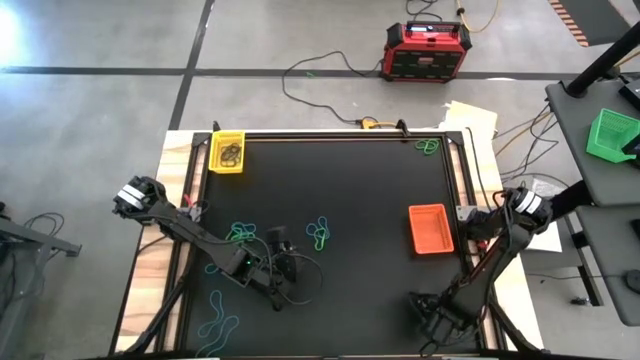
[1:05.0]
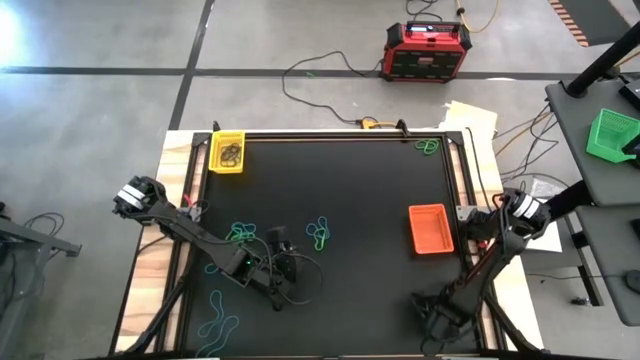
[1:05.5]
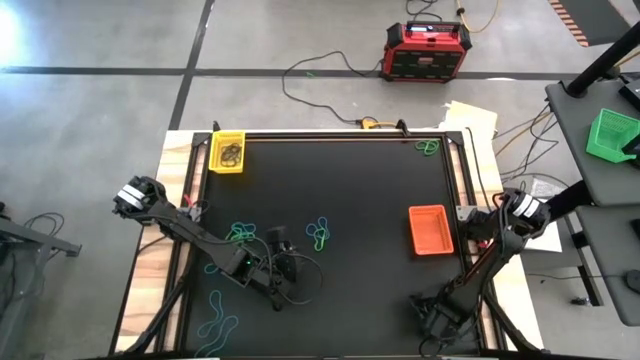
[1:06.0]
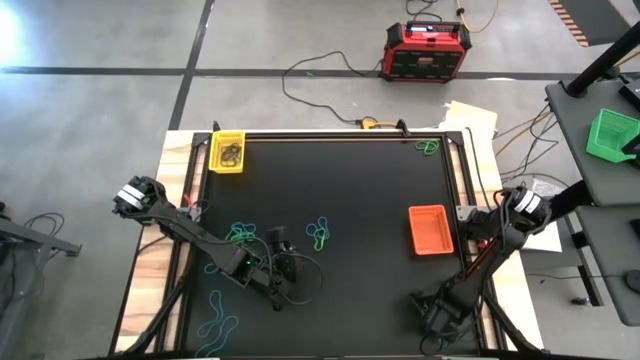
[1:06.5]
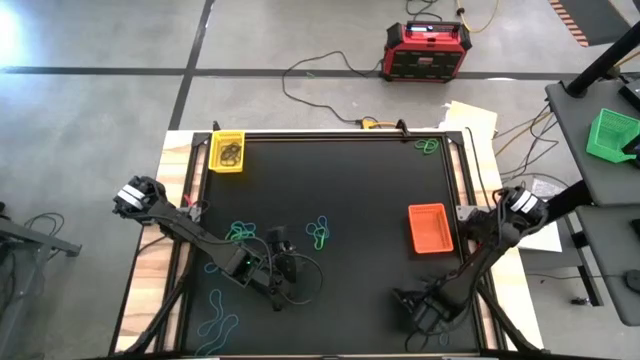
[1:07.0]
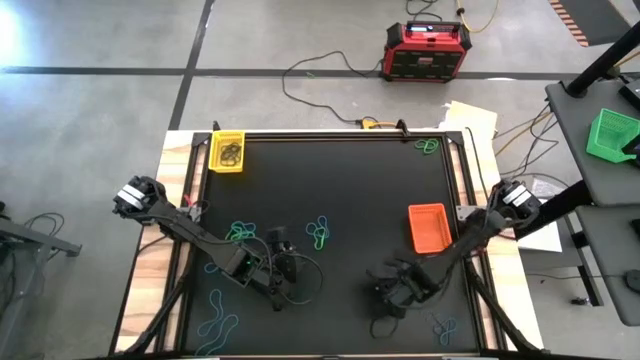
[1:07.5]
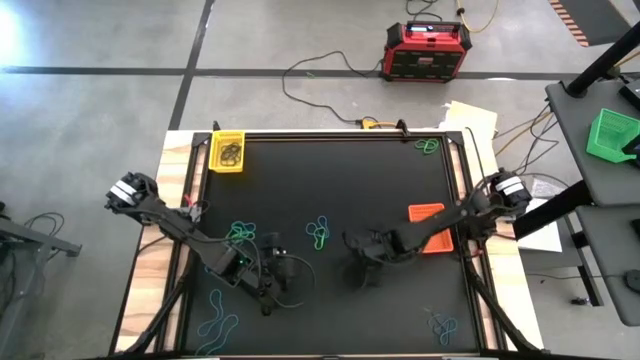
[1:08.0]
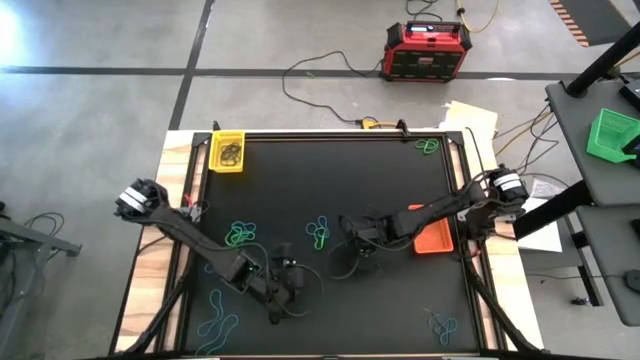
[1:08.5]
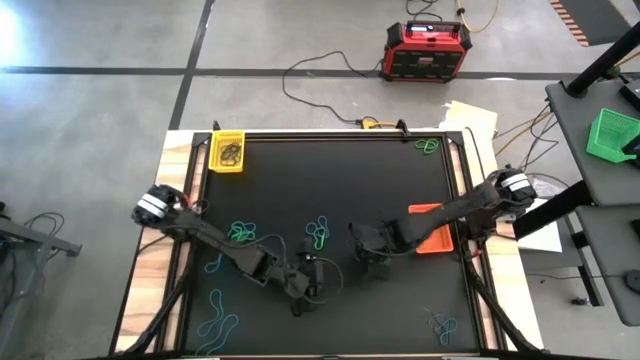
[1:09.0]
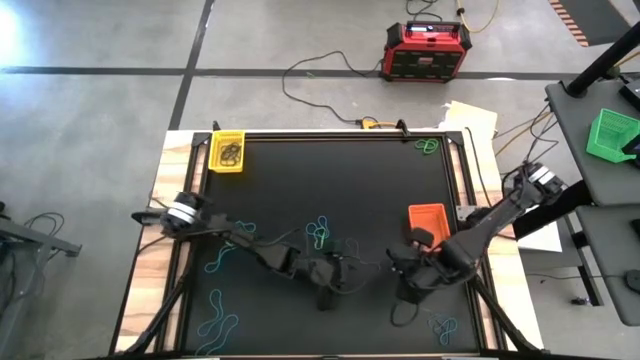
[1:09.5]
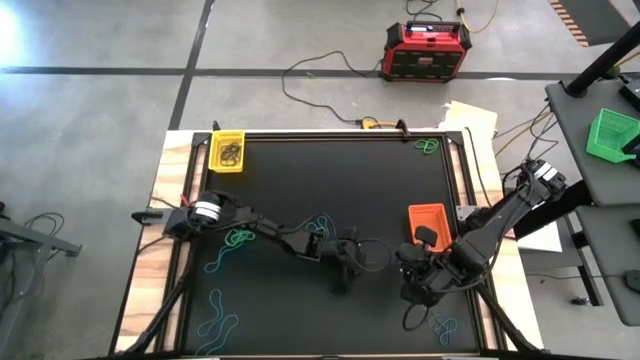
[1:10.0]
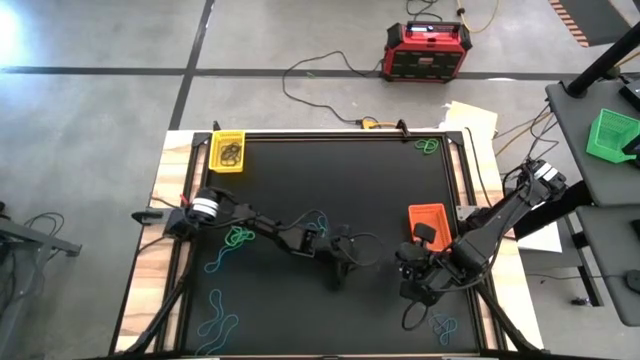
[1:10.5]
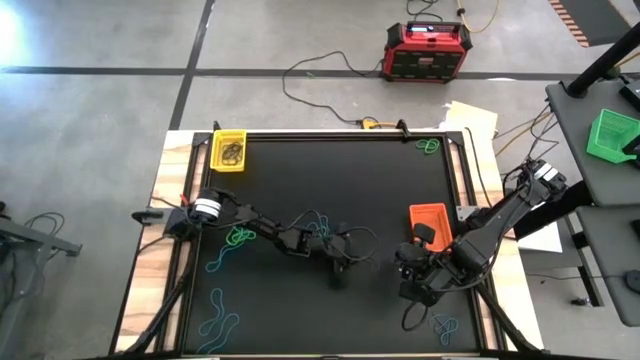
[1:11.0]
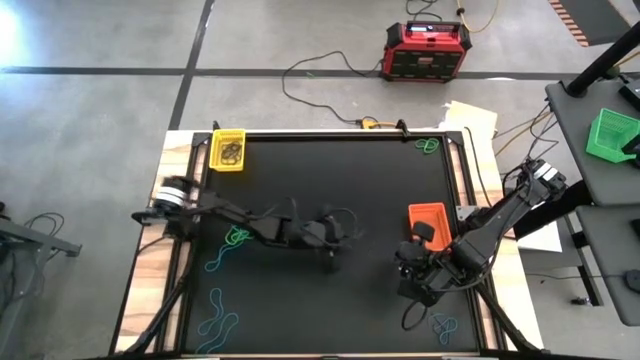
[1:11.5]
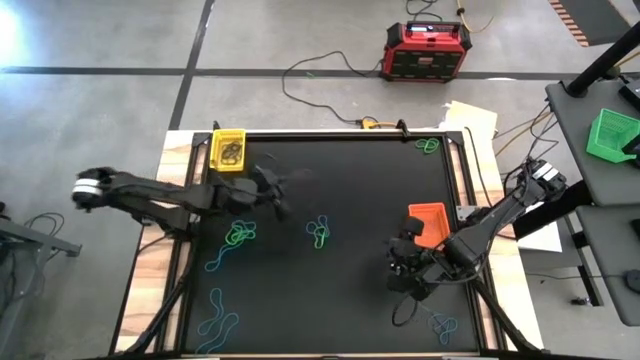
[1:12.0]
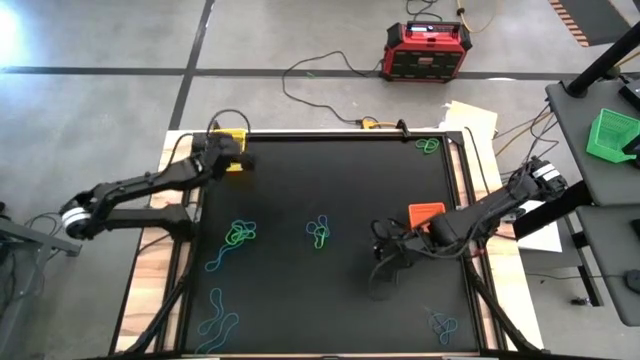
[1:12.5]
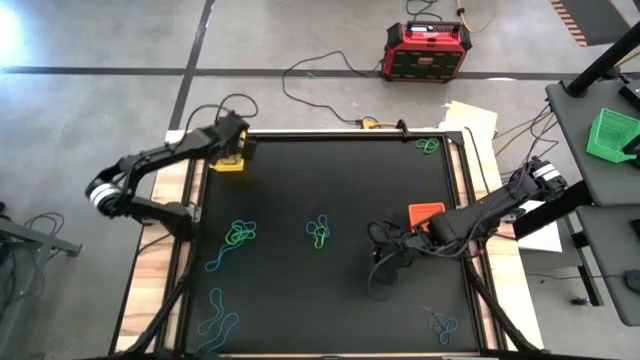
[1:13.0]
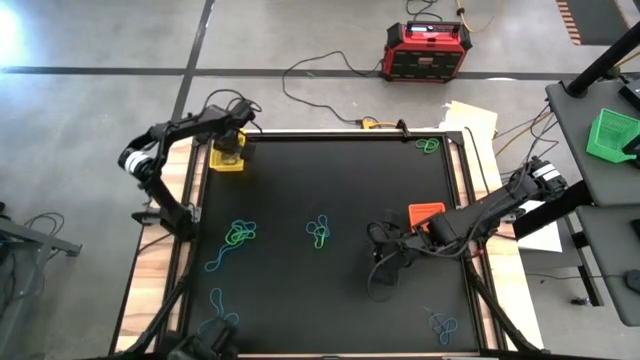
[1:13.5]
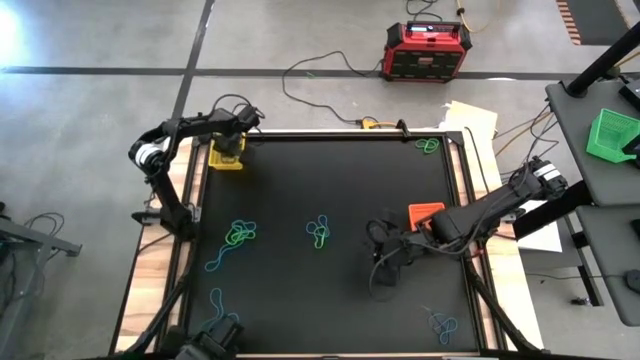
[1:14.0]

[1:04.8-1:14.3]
Task: Sort rubber bands into baskets
Put the purple rubber band into the yellow bin

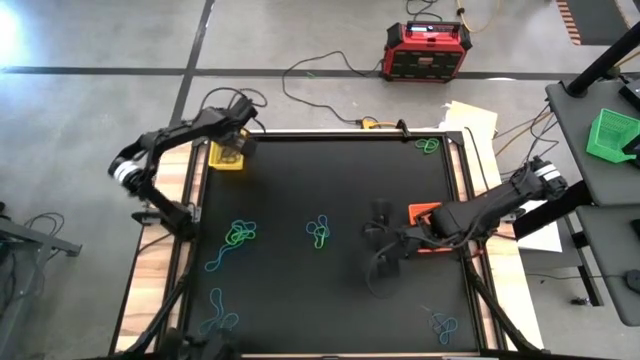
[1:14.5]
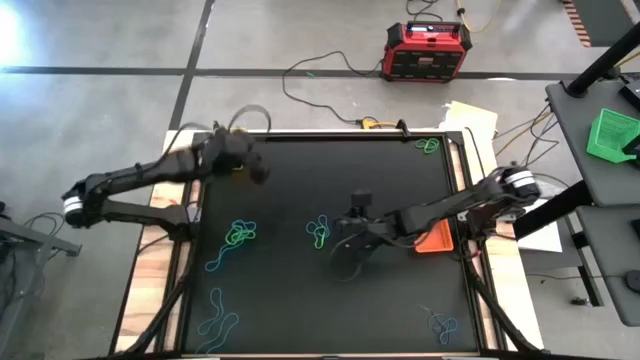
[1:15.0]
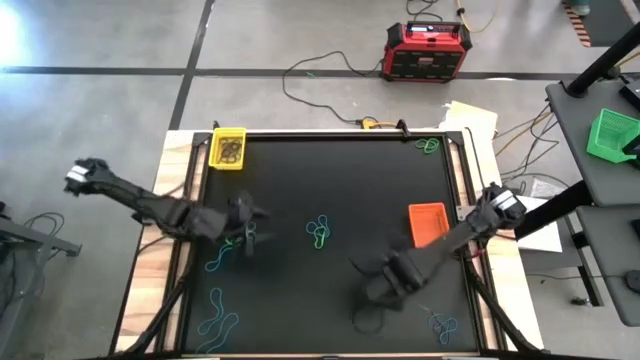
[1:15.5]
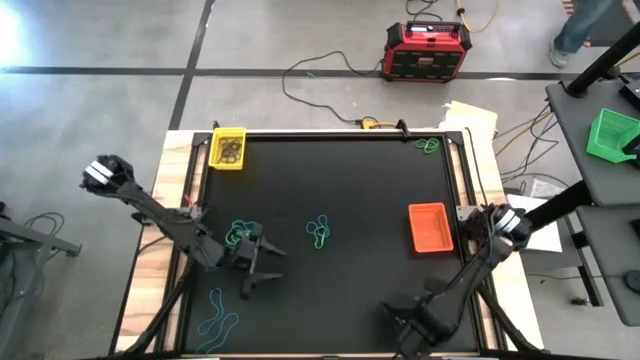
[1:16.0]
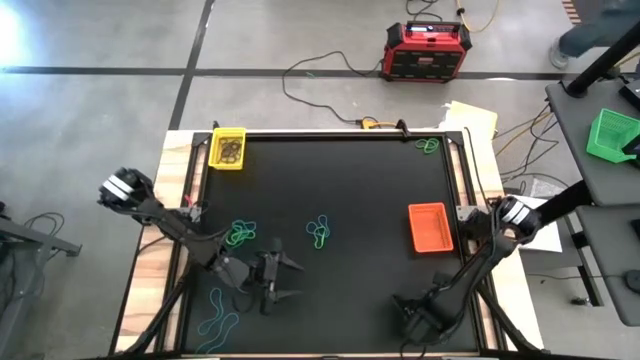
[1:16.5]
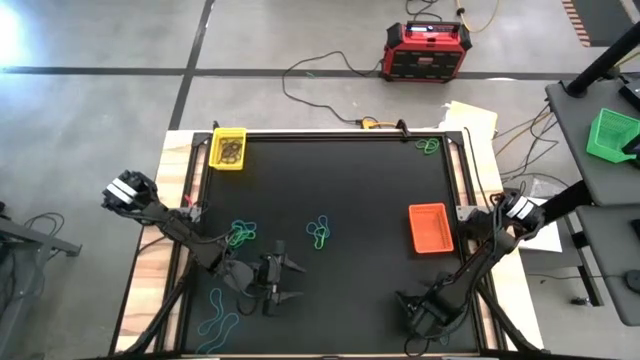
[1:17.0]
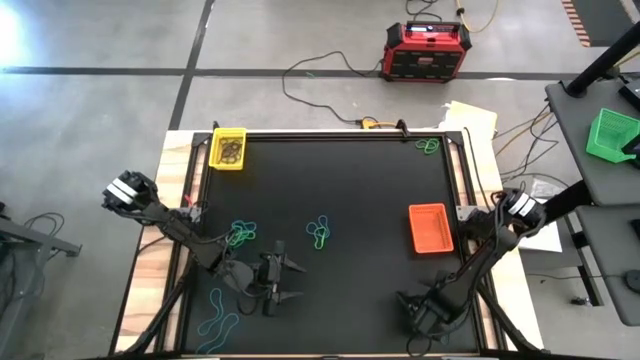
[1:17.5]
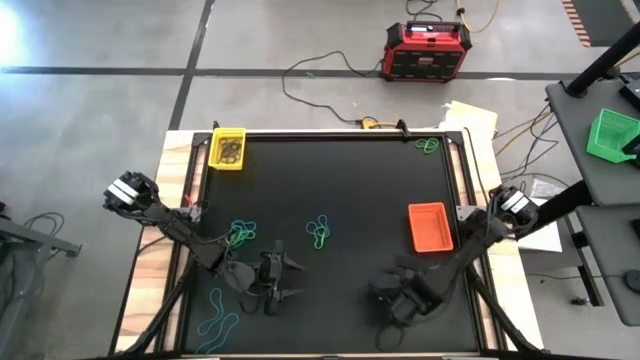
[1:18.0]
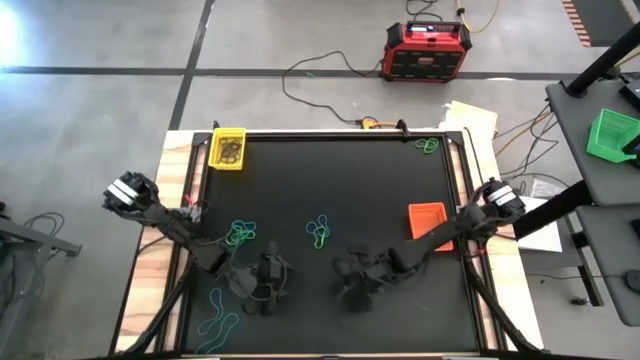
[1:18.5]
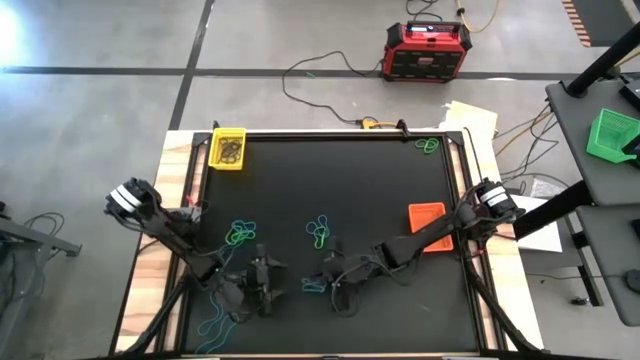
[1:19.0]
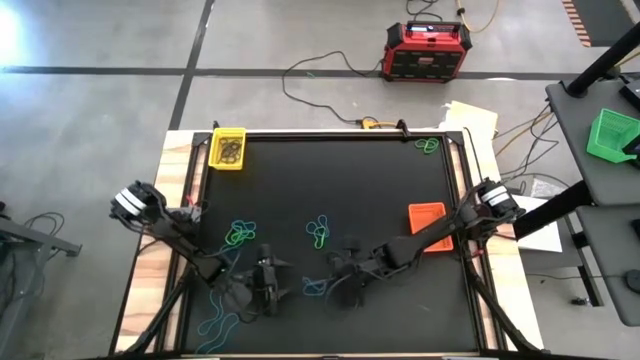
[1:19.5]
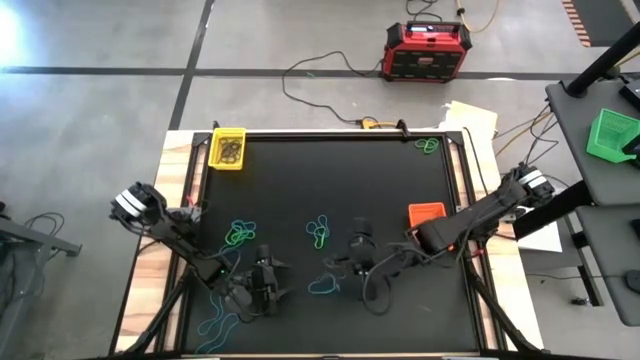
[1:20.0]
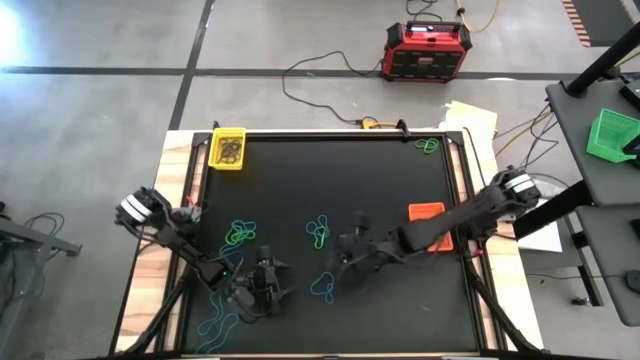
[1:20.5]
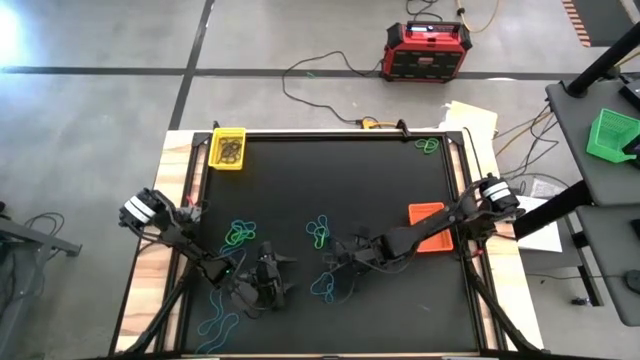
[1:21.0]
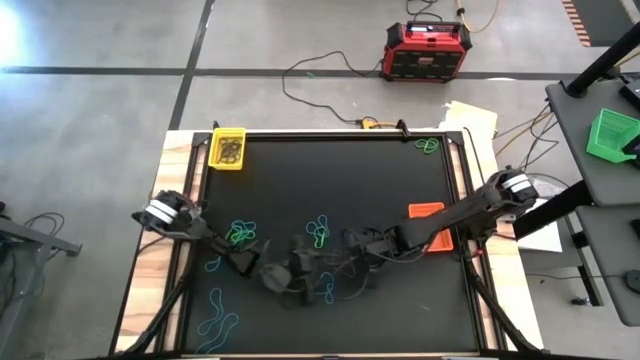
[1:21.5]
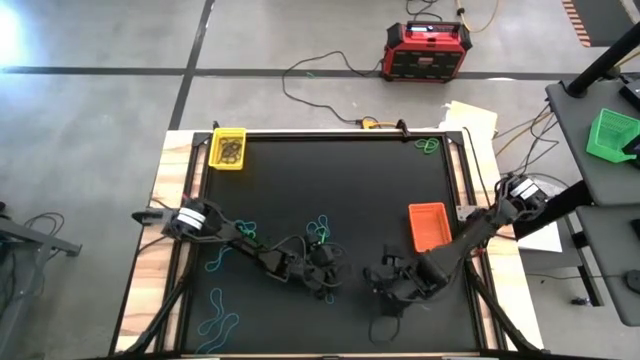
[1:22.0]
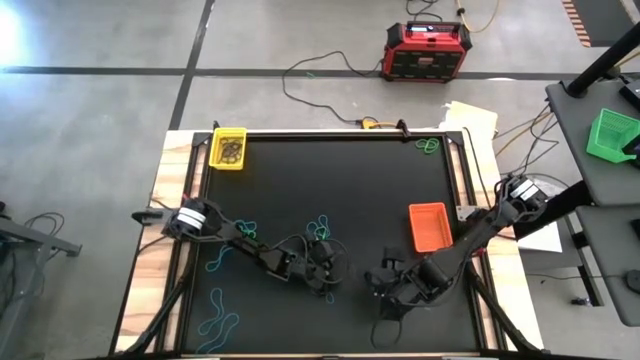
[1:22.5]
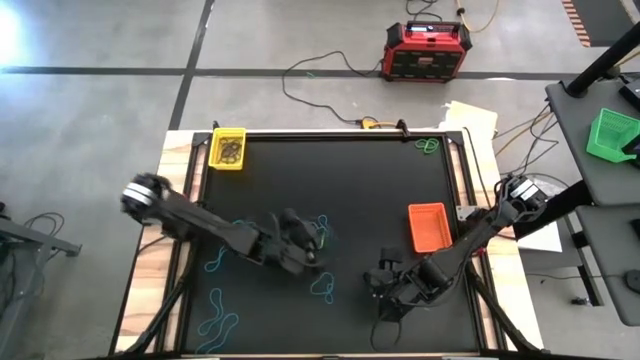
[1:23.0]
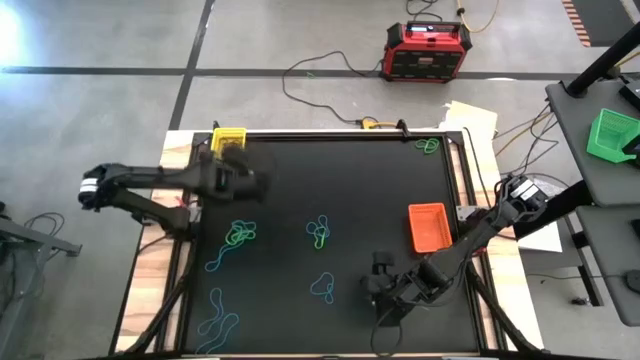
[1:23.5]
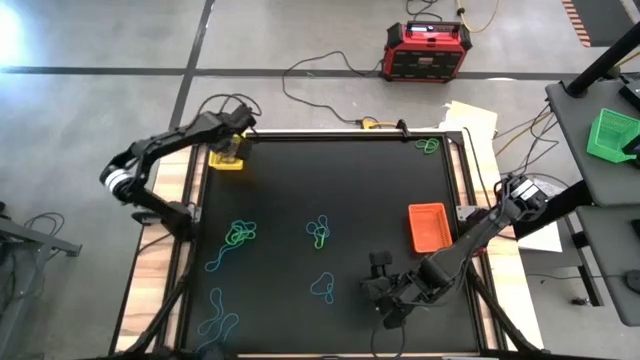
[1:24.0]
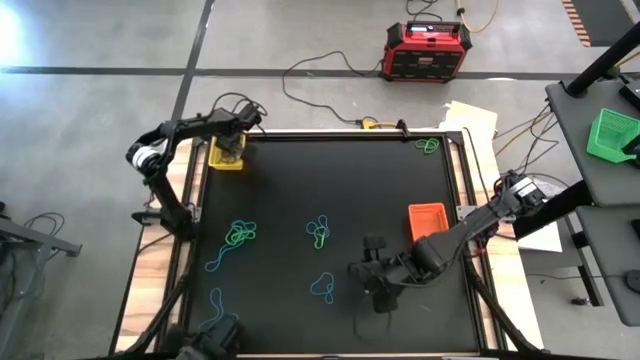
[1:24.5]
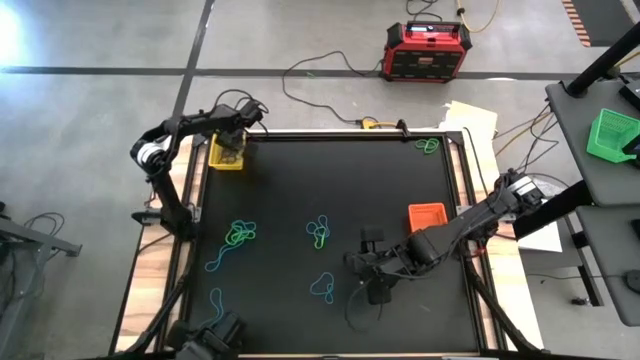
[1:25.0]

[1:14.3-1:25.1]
Put the purple rubber band into the yellow bin

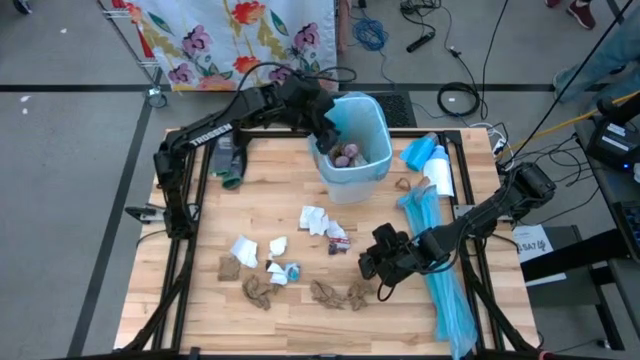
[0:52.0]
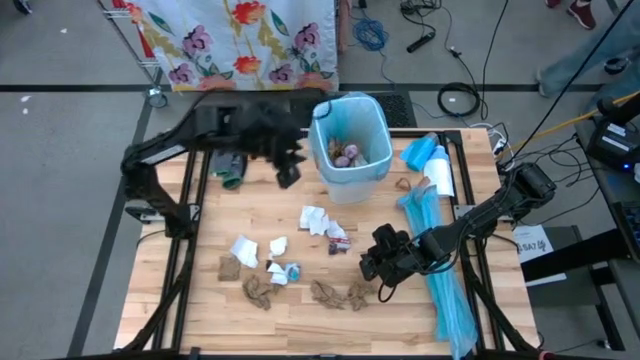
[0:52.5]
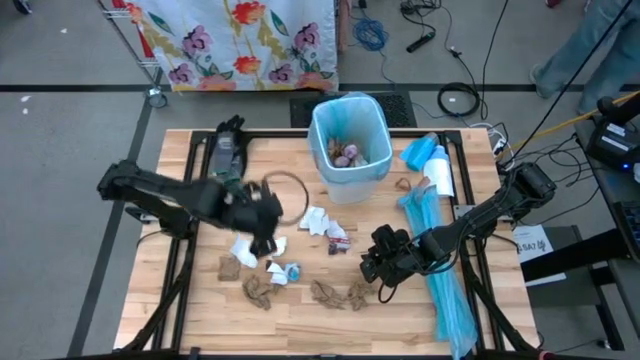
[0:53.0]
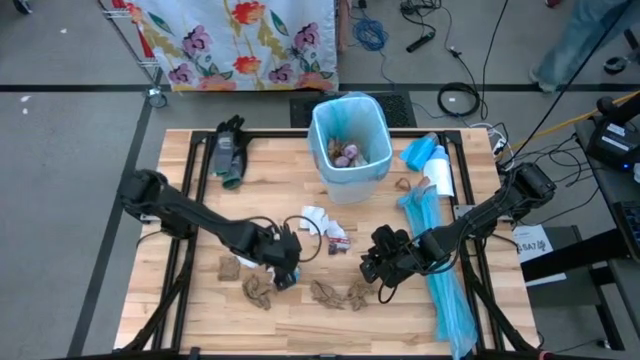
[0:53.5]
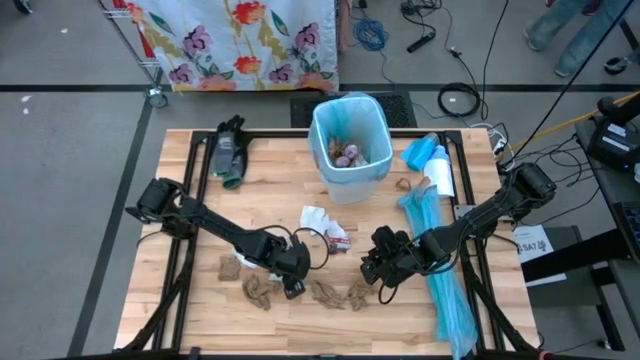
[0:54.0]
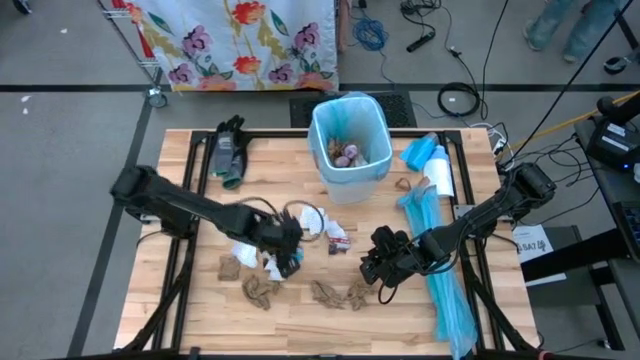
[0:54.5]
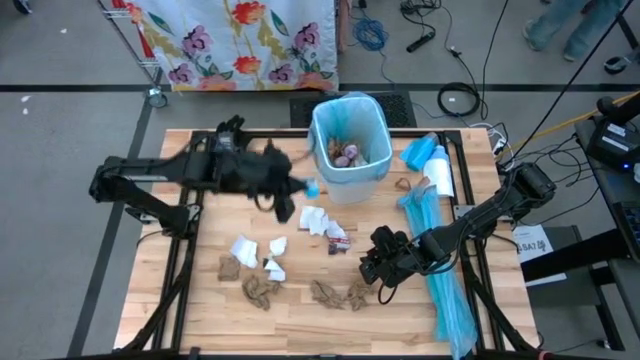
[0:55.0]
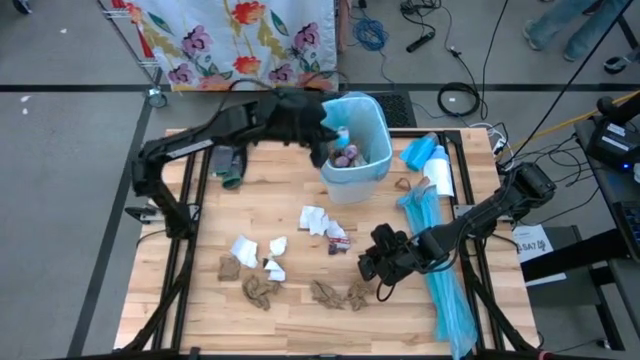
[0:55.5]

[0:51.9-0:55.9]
Task: place trash/remove bag and relplace
Put the crumpled blue trash bag into the trash bin
